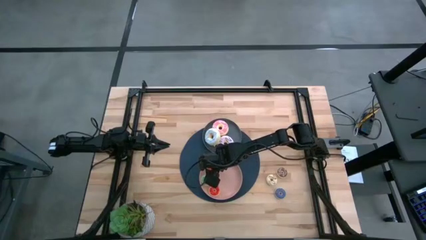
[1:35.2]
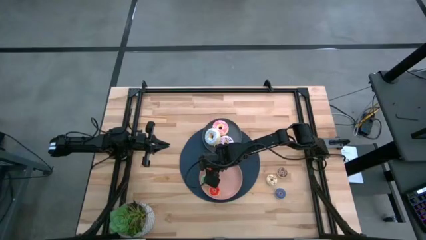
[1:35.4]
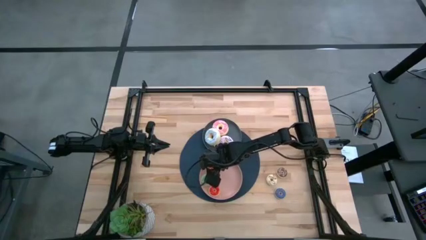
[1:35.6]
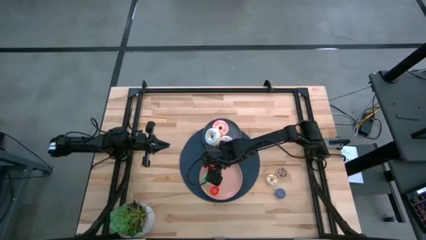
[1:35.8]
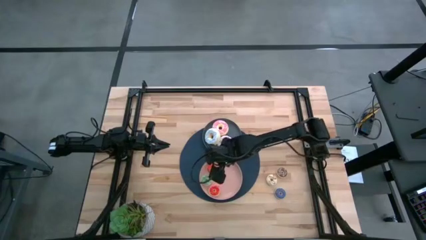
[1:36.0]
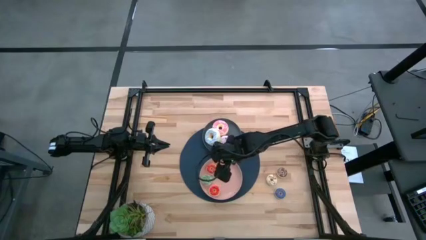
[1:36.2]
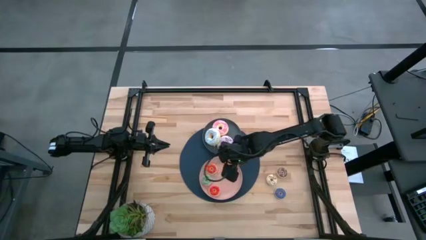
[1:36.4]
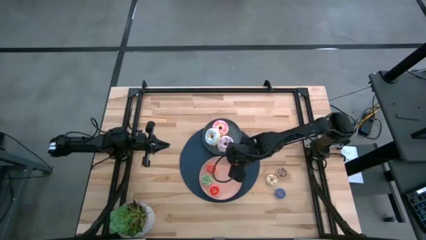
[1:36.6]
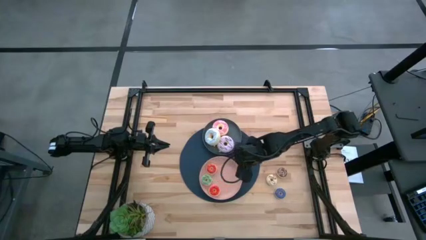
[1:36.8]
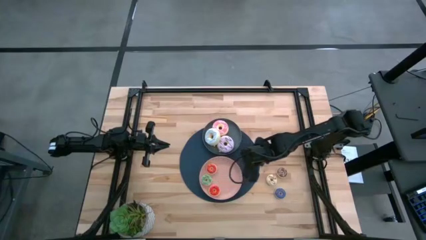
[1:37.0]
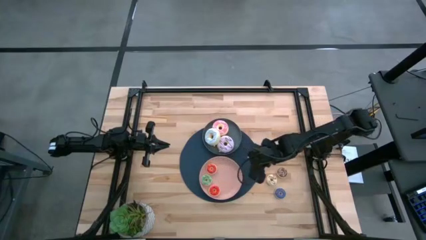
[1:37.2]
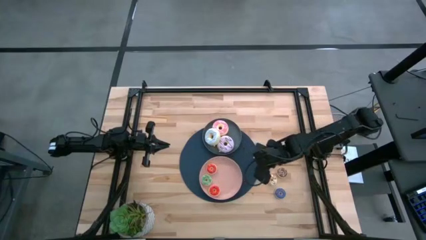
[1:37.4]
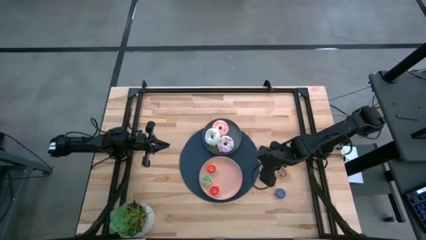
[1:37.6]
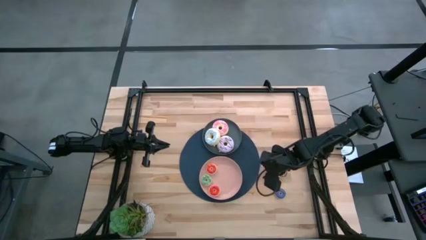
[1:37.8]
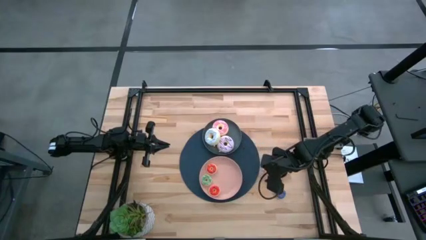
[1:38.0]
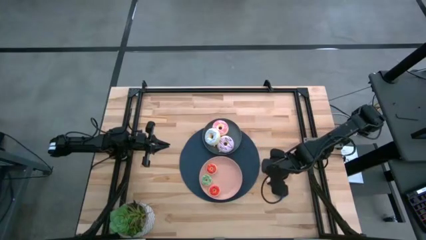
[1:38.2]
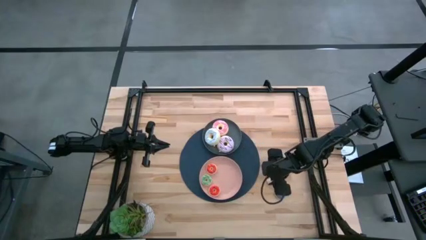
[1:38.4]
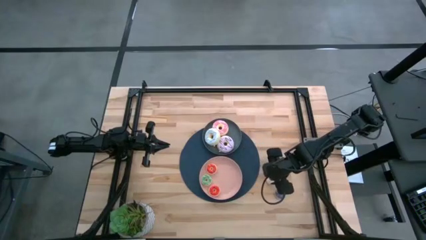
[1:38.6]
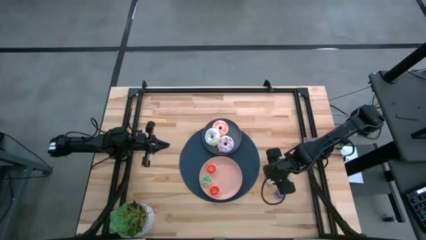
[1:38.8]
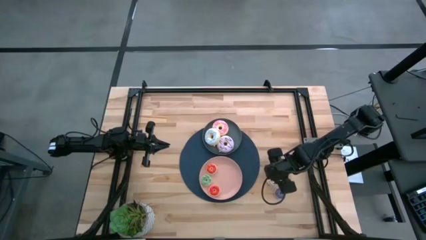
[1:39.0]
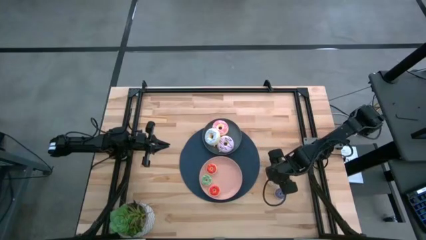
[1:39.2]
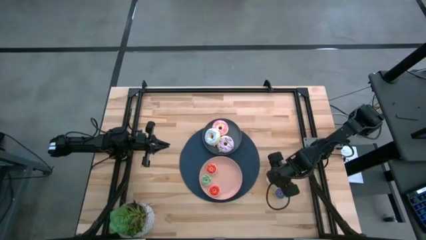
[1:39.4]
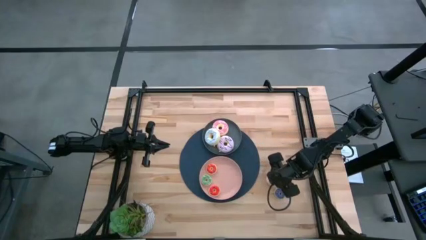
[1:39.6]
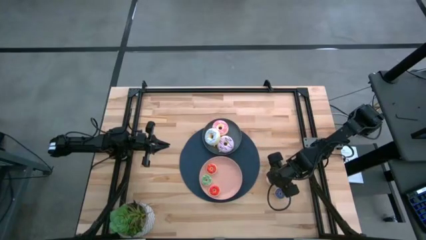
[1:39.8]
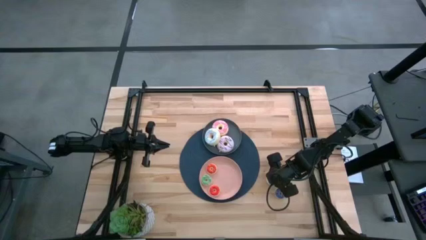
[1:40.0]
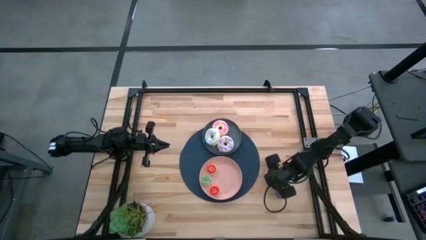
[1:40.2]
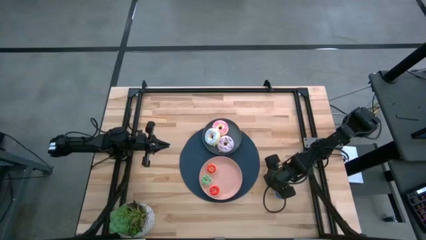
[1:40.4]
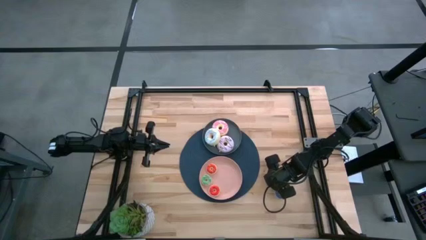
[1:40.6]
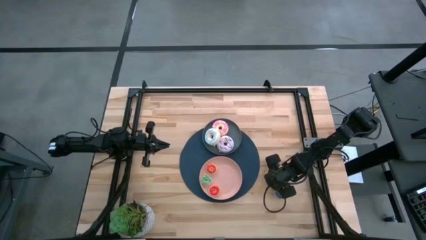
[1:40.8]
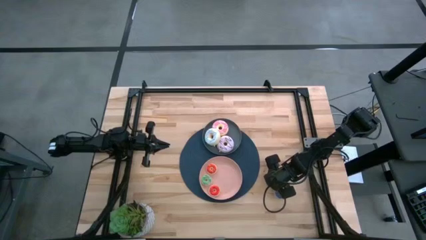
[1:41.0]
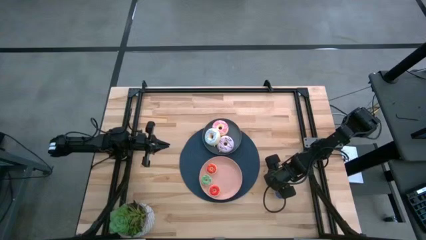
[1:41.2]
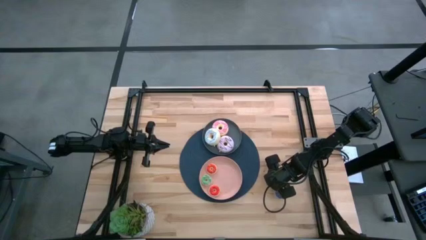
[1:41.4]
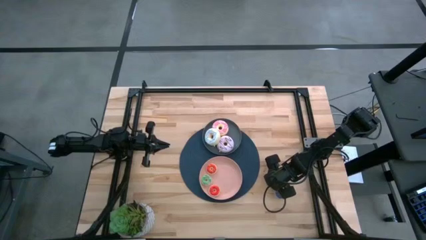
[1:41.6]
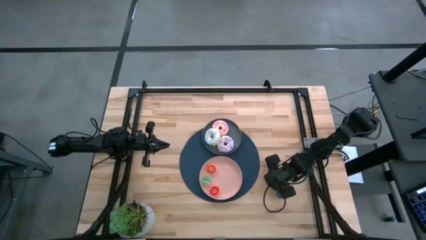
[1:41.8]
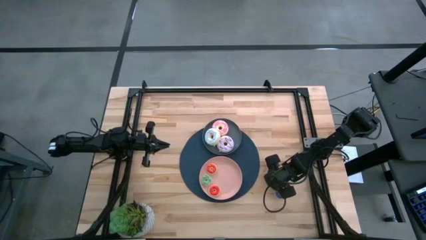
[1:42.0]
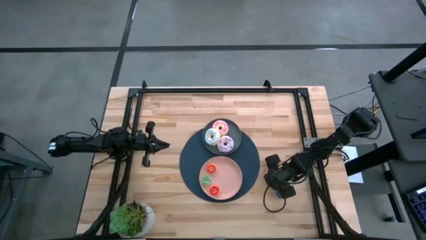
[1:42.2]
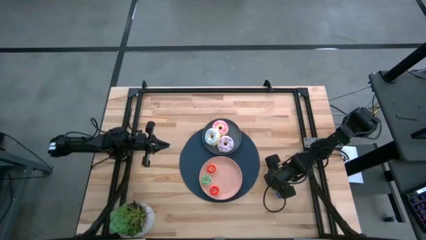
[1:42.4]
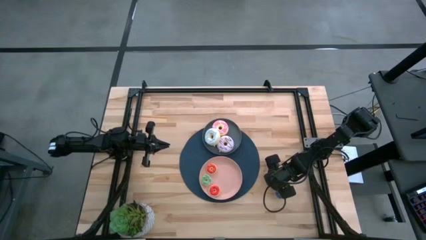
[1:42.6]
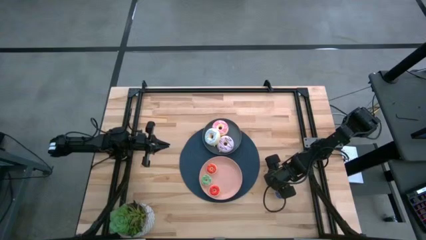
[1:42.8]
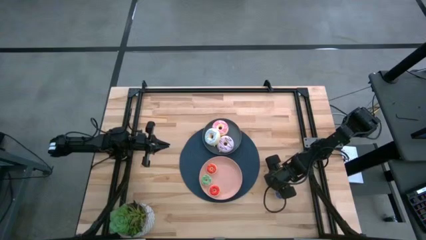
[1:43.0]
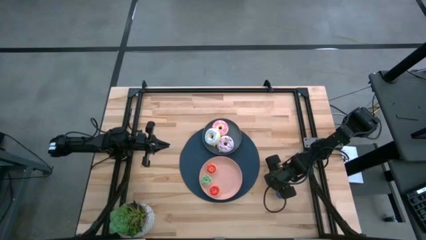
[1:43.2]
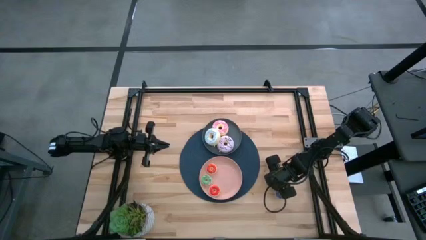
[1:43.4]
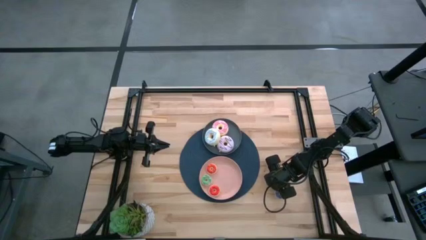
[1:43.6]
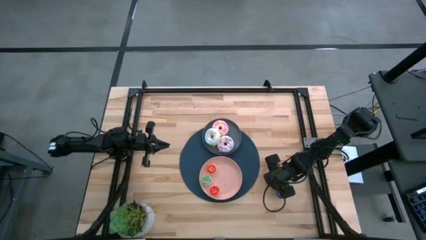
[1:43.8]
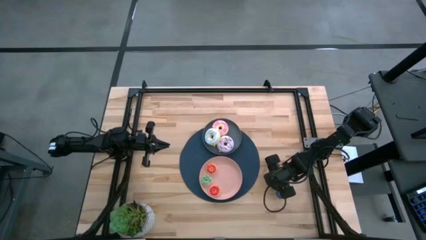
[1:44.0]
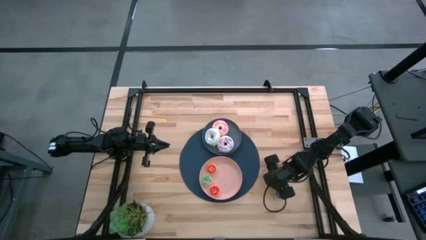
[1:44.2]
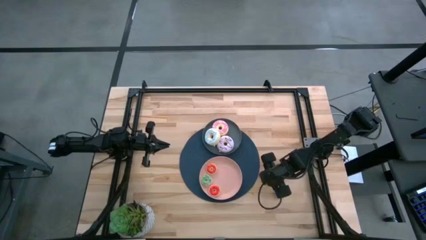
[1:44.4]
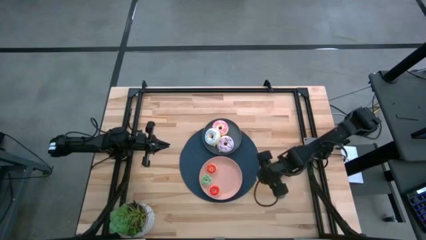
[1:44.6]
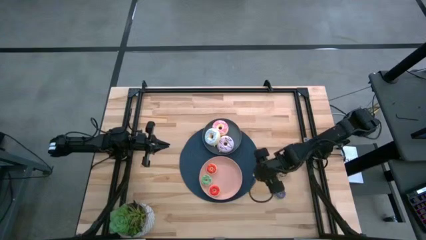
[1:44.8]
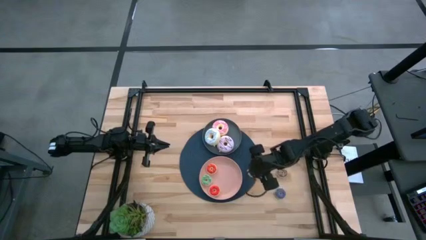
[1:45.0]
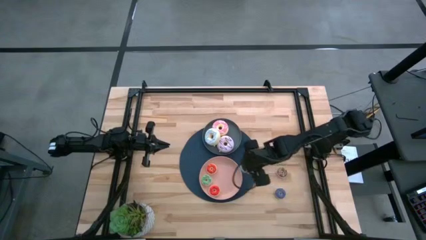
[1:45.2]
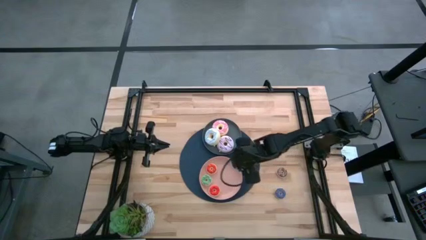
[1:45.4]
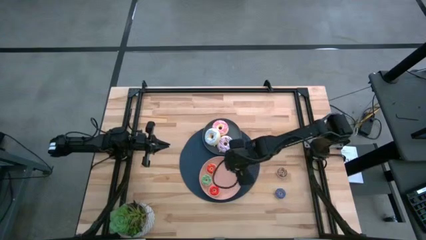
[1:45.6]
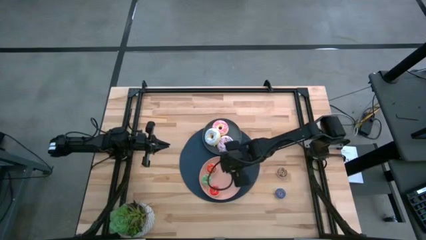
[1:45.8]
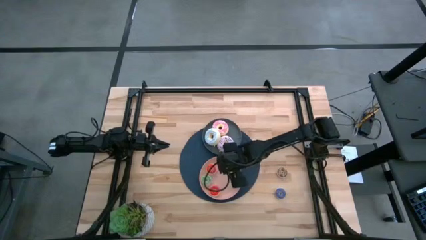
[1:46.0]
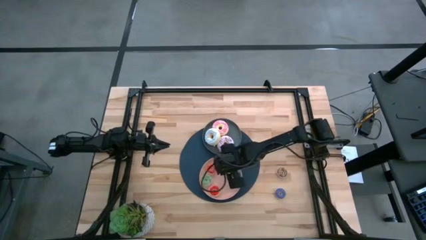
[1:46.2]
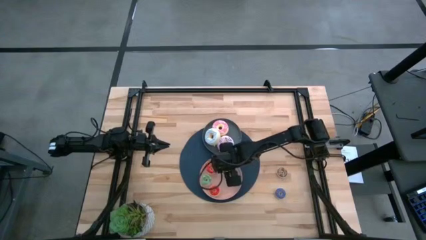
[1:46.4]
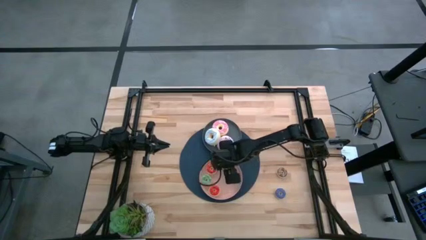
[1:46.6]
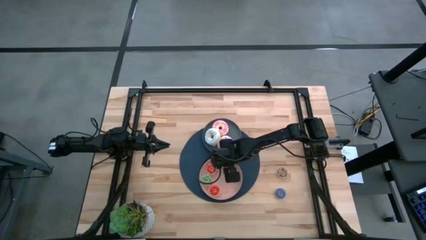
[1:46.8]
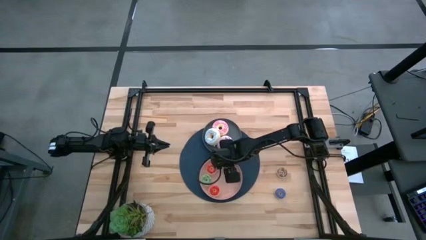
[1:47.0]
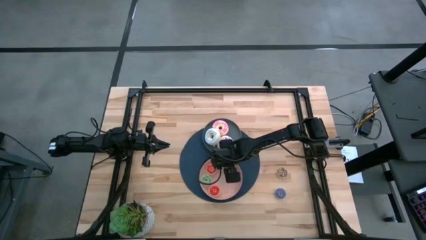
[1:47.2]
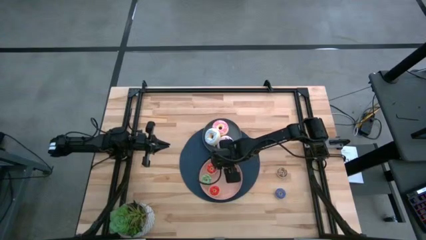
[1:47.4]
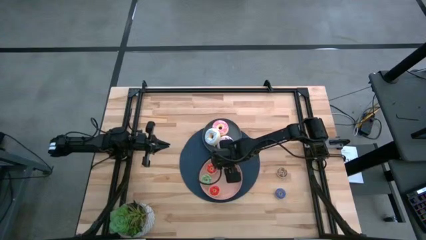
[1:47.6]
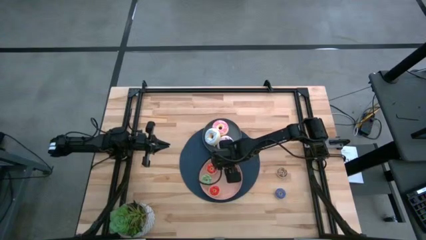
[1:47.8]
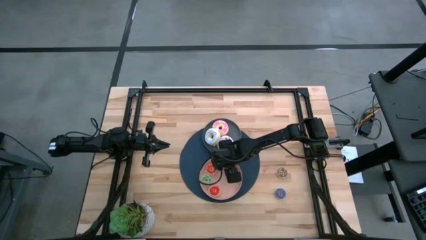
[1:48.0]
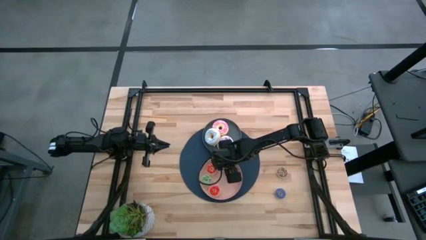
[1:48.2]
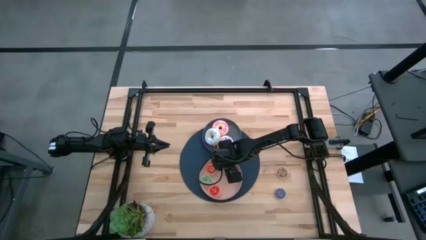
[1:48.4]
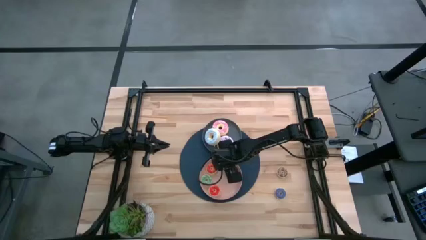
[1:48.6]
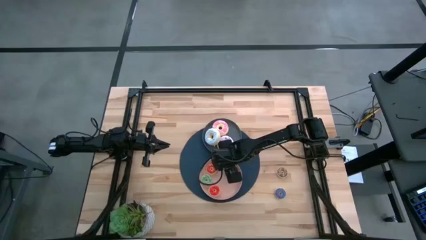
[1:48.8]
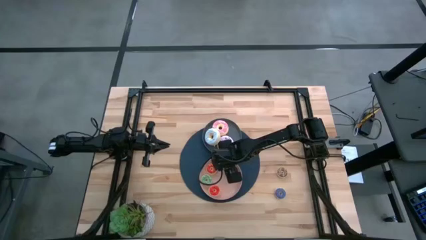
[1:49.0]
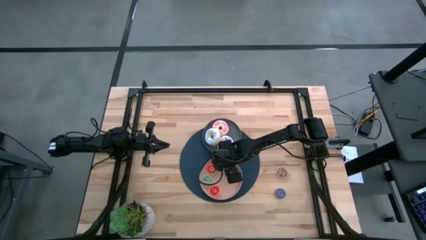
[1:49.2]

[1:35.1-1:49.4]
Task: Pick & Place donuts
Put the small white doughnut into the pink plate

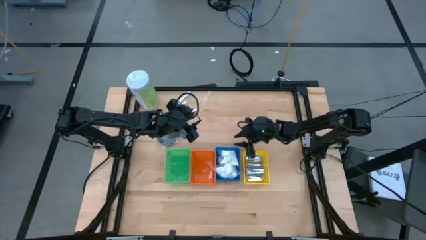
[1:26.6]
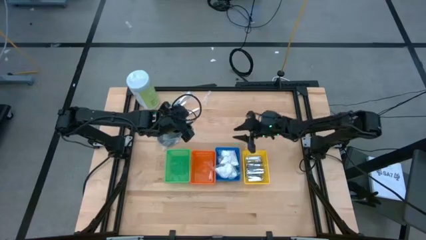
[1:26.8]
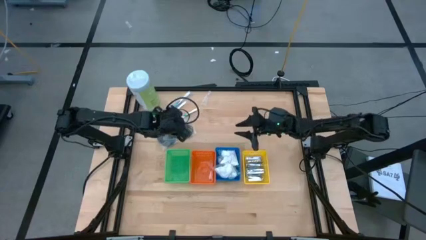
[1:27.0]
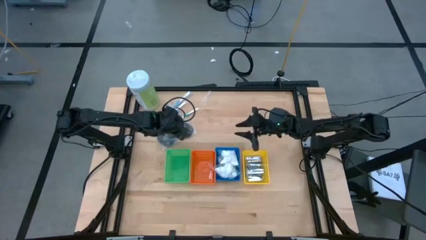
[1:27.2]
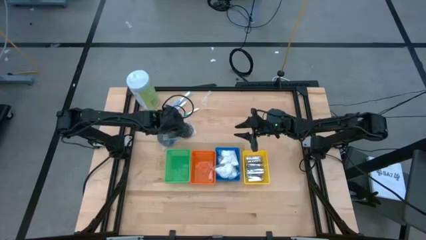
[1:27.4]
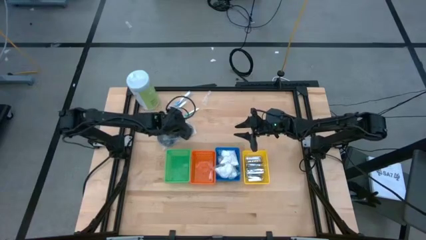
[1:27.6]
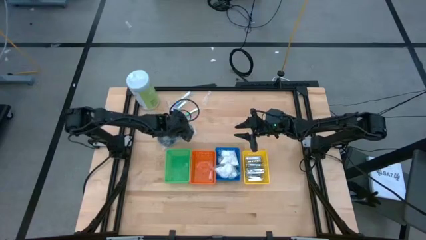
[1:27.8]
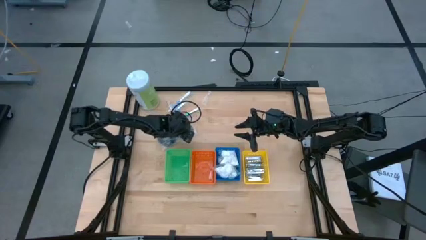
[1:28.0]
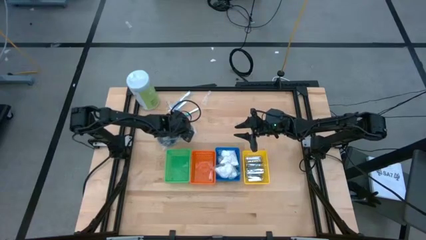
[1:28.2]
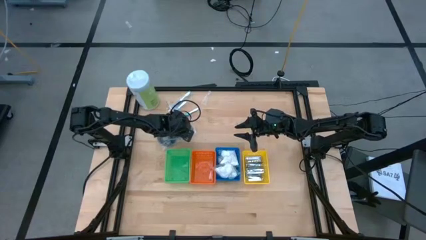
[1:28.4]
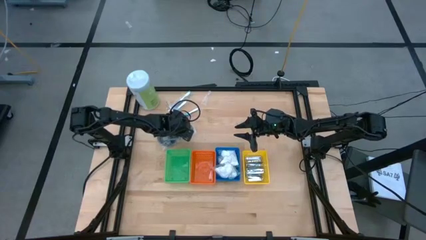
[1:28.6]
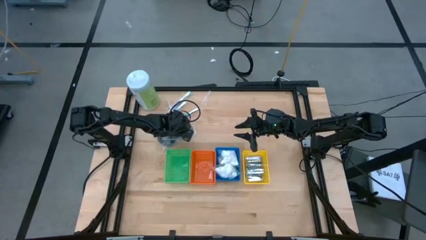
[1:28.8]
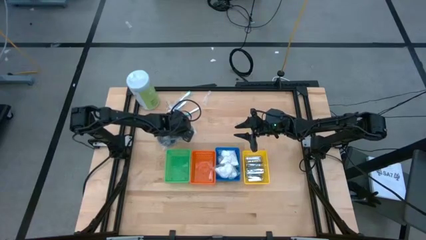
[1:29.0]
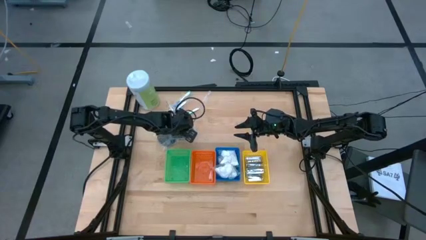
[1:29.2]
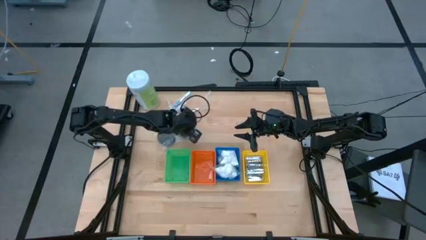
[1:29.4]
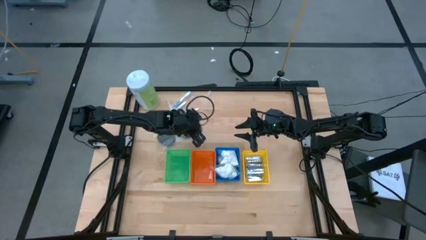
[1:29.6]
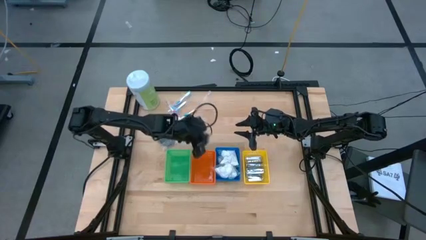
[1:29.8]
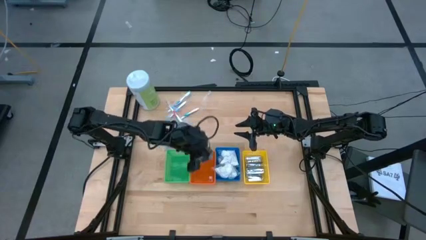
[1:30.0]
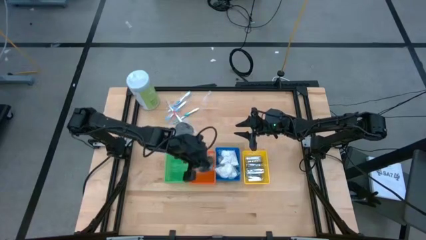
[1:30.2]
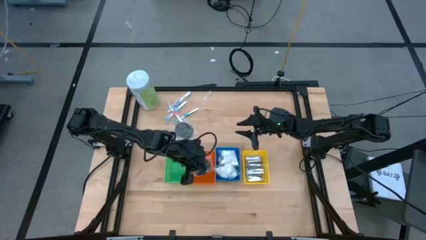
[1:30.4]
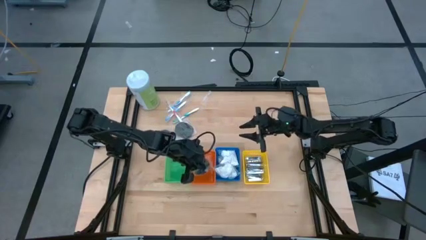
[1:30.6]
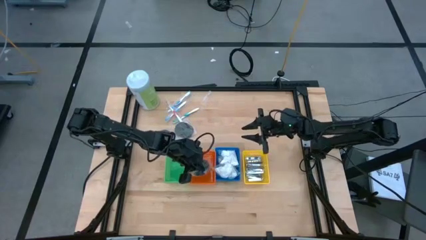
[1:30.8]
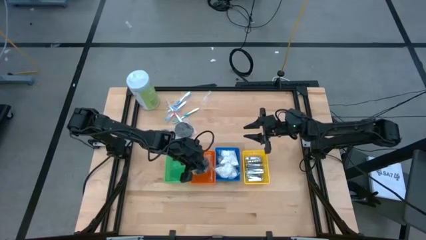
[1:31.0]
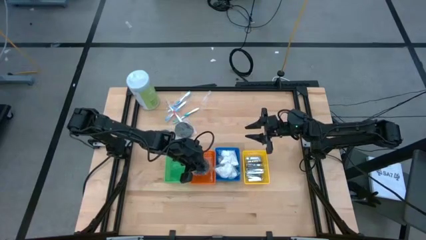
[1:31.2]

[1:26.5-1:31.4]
Task: Pick & Place Travel size toiletries
Put the black mirror into the orange basket
